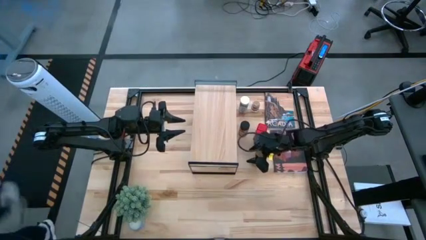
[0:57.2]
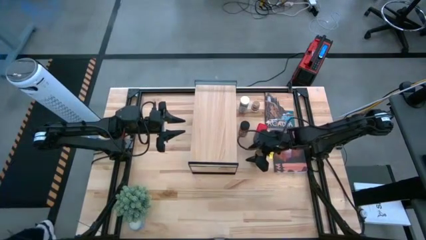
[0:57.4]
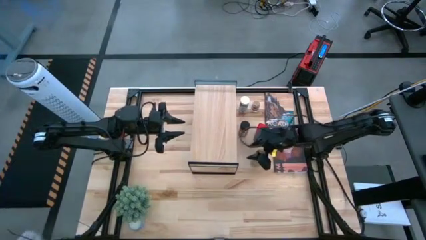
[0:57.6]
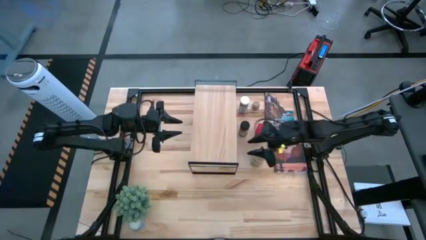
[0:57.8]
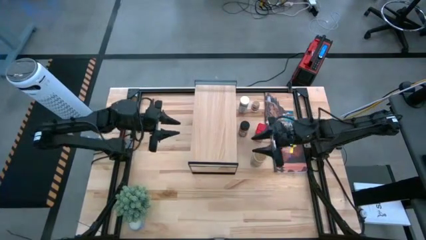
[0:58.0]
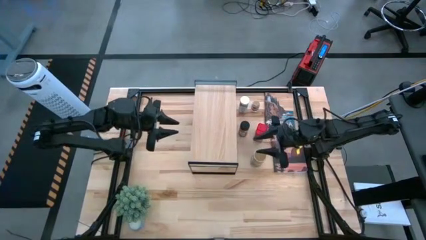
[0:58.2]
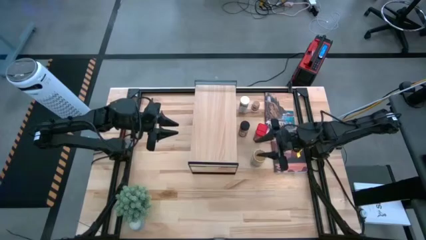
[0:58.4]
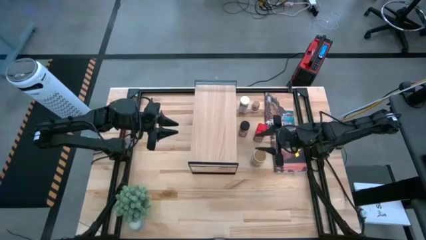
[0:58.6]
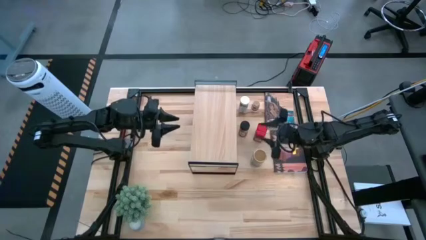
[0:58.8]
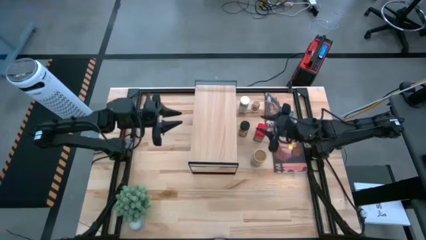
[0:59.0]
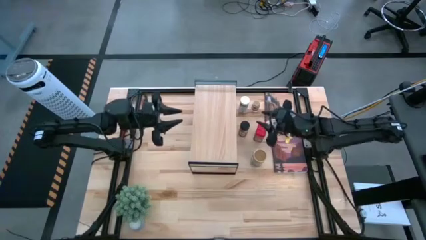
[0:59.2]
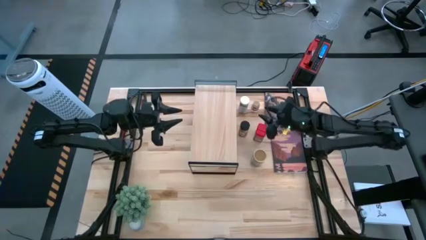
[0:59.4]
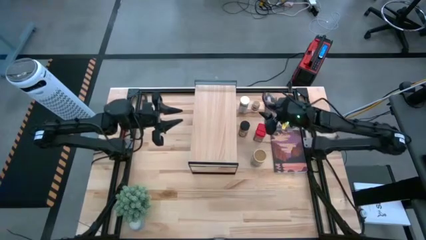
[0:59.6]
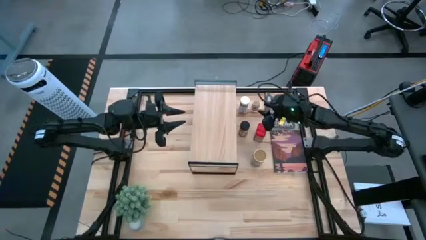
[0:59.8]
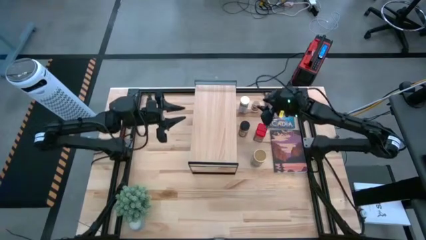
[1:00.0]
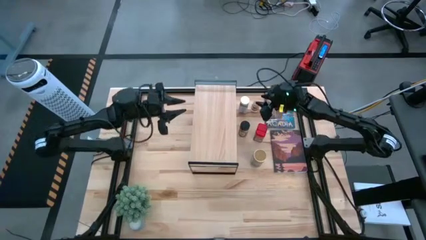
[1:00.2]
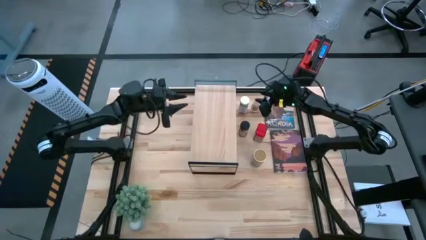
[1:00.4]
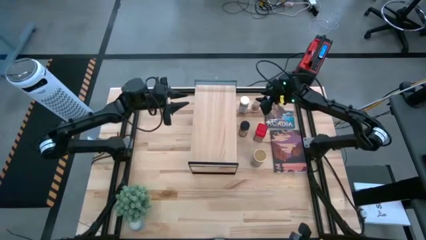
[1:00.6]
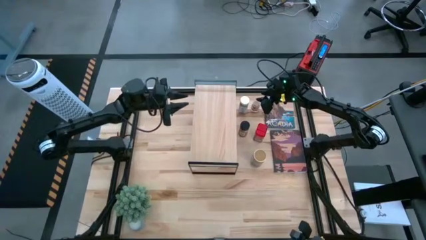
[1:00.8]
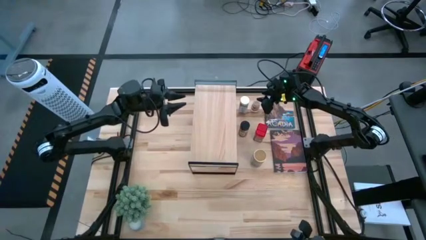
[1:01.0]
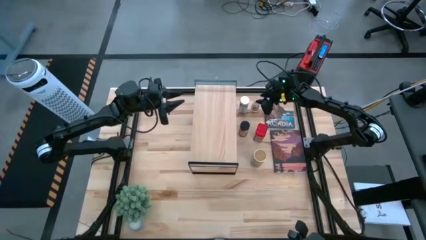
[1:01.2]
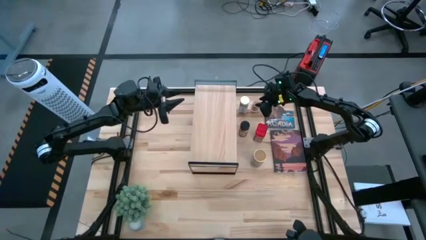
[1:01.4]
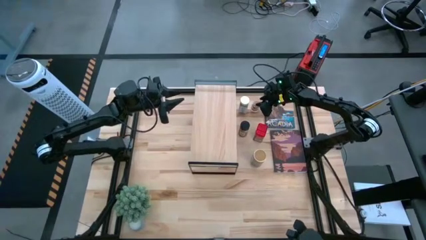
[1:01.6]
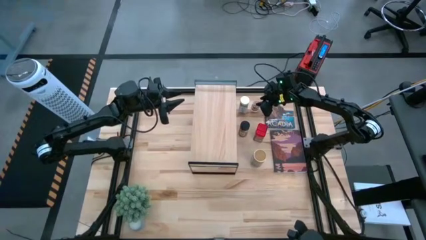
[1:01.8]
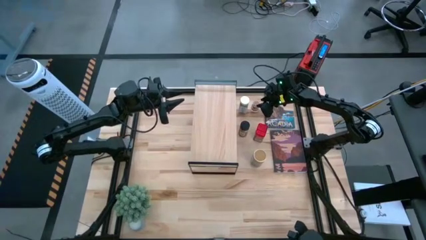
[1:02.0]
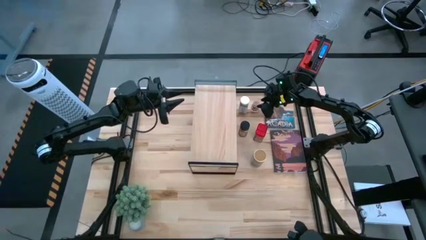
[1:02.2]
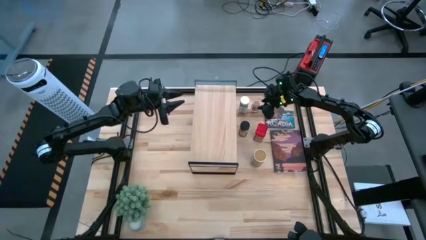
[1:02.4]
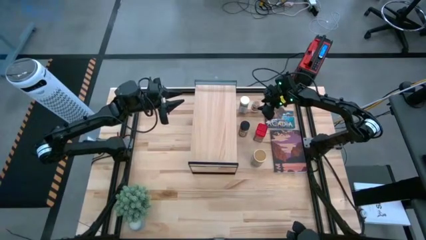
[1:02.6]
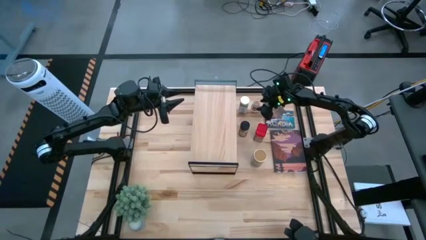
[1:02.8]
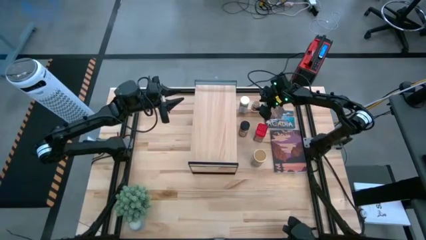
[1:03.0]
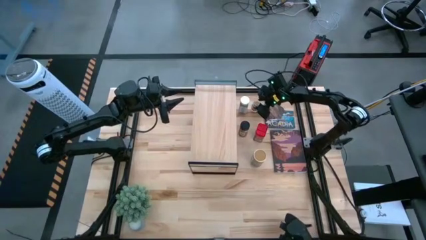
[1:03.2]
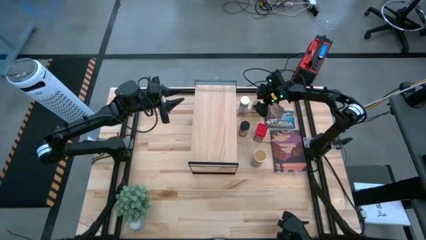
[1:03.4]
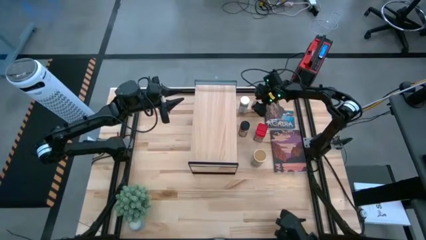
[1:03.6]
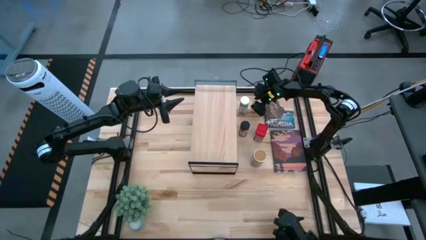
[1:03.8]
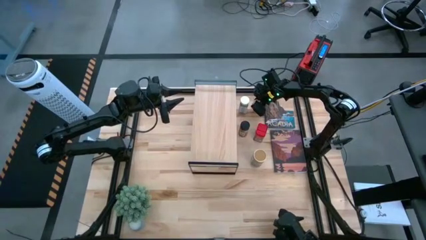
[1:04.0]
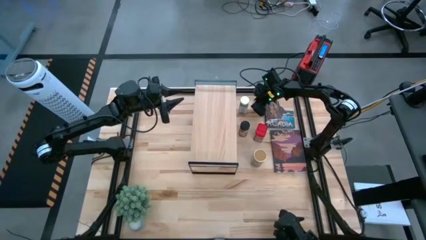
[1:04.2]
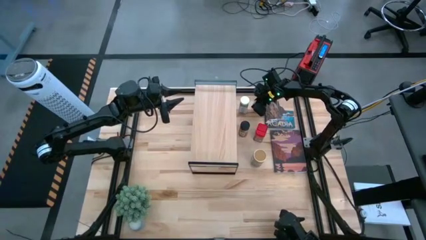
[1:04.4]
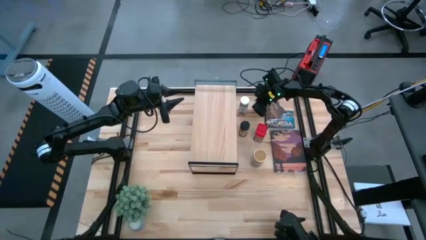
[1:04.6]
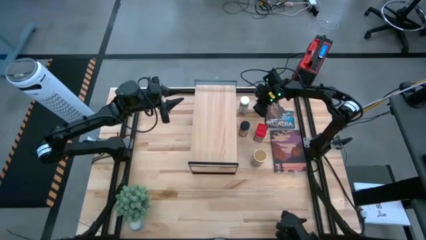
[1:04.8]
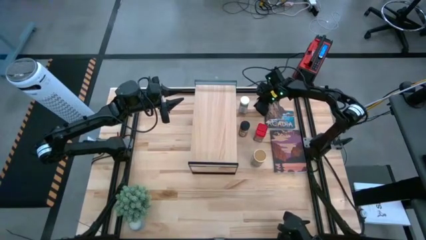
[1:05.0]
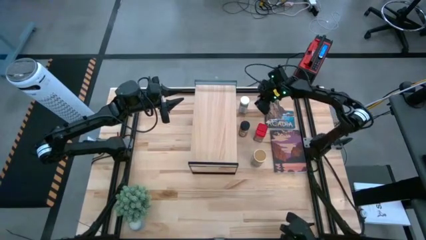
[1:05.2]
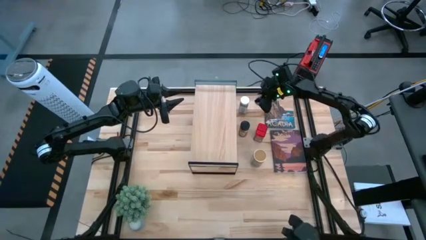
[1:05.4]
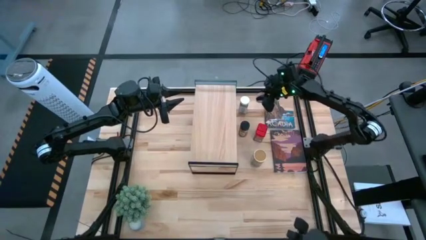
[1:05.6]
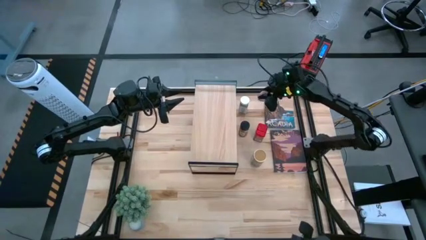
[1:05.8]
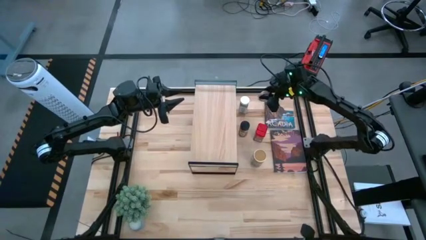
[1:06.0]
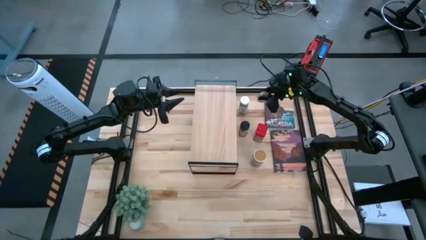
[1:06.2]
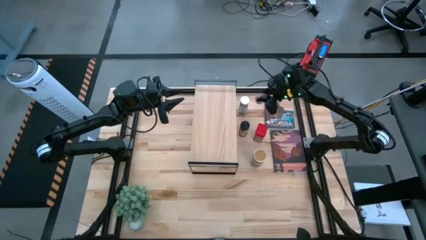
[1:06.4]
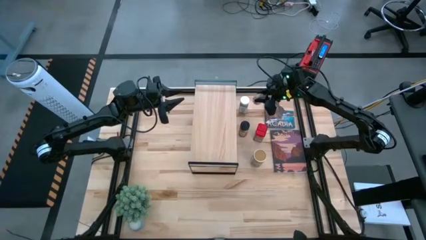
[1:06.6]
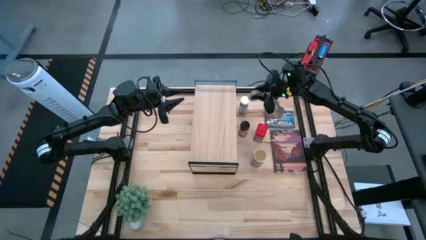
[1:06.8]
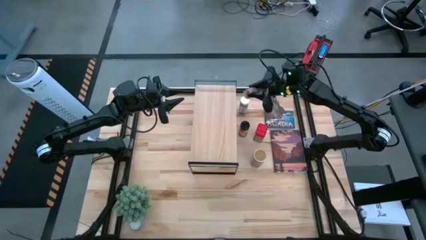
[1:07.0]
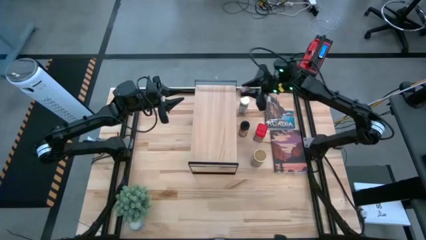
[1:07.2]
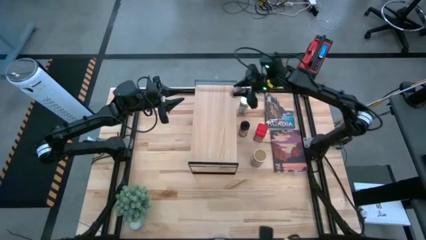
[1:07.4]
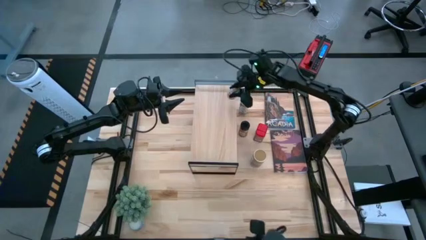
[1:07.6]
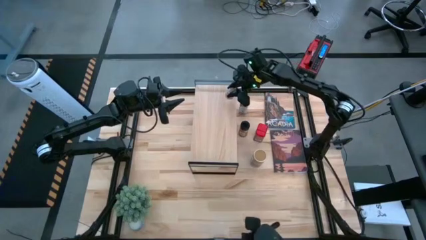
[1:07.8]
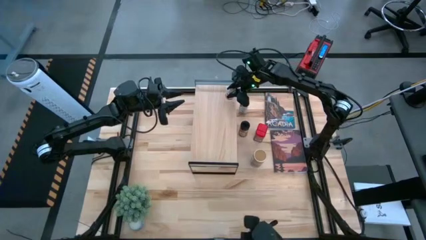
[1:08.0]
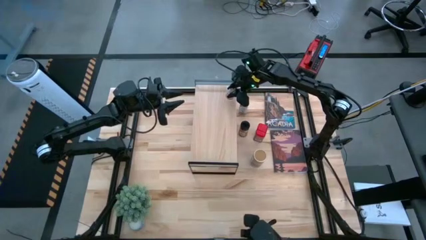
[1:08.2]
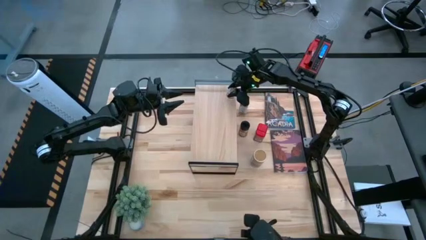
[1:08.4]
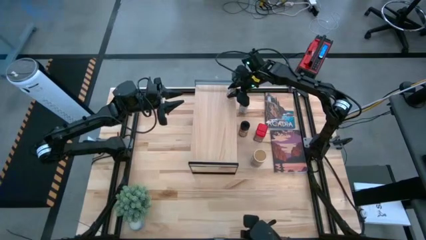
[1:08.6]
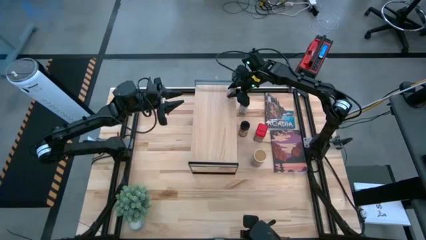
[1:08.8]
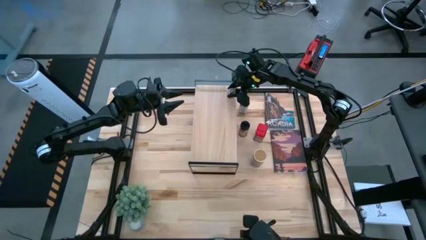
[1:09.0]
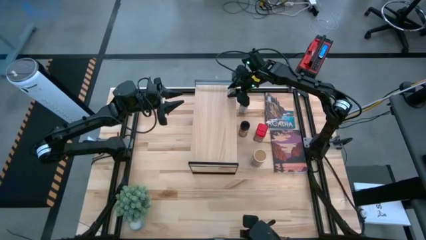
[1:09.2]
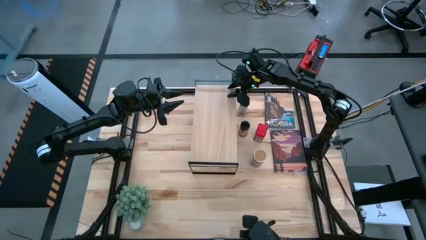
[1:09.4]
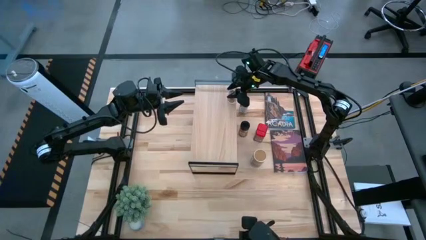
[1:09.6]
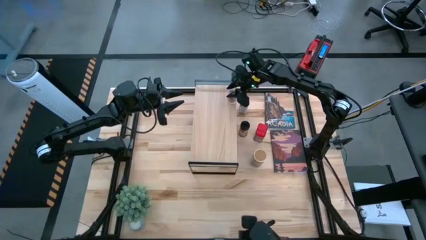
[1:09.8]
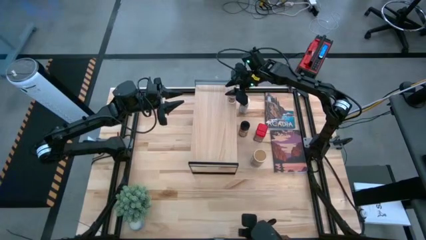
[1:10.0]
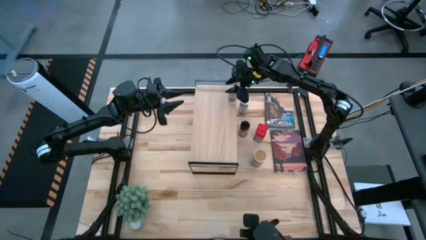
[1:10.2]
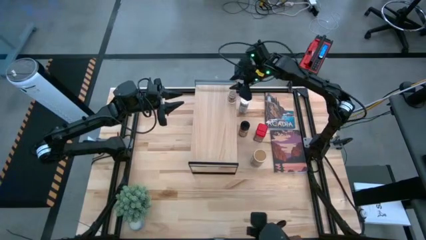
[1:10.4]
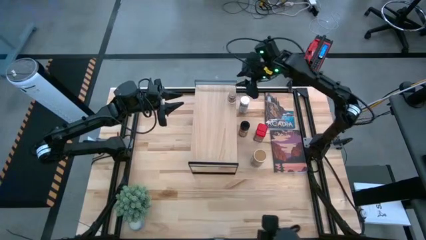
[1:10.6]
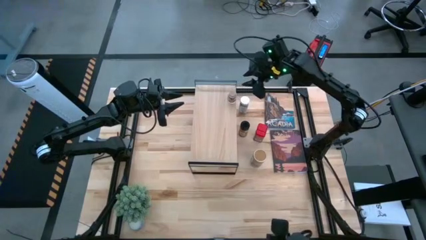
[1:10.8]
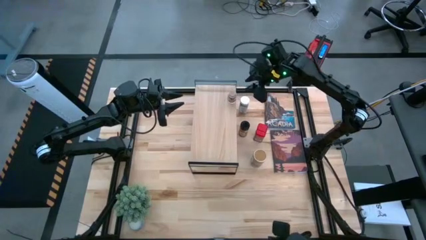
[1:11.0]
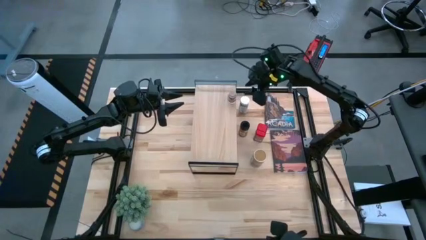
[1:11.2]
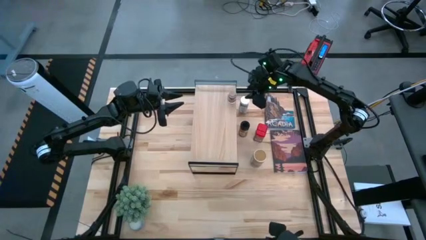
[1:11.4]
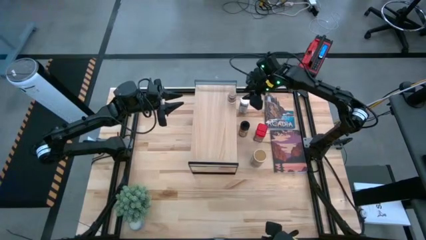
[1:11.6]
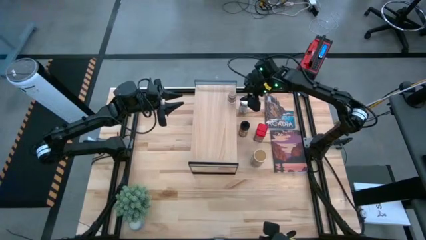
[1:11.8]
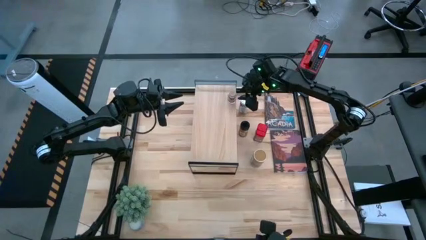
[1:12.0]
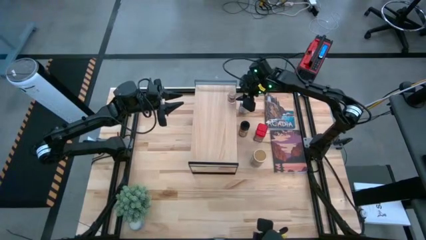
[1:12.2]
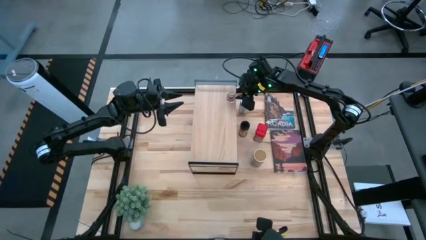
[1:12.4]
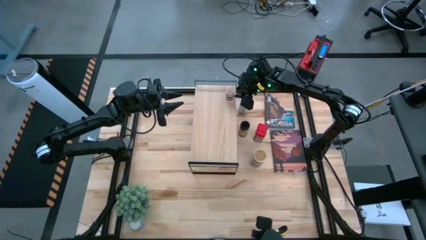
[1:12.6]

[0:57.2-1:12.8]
Task: Shelf spices
Put the transparent seasoning bottle on the shelf

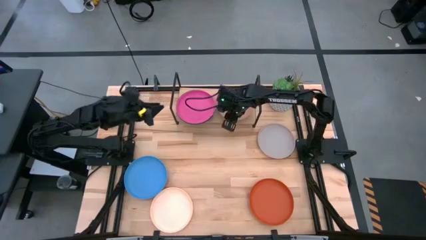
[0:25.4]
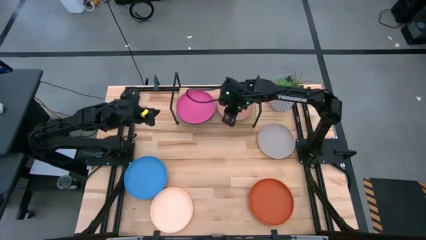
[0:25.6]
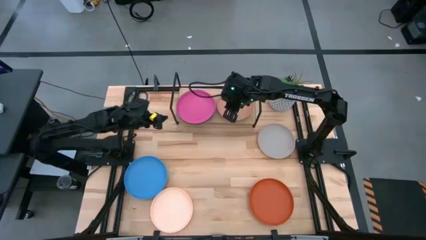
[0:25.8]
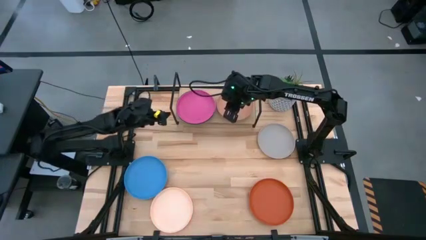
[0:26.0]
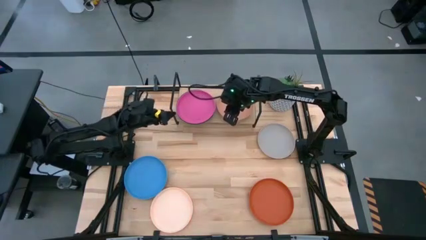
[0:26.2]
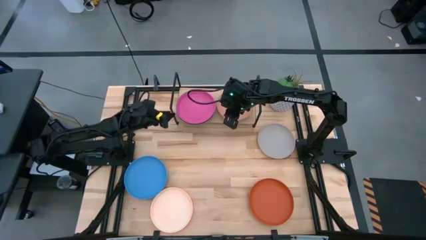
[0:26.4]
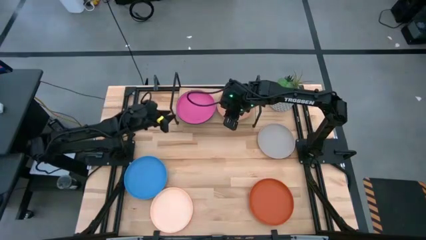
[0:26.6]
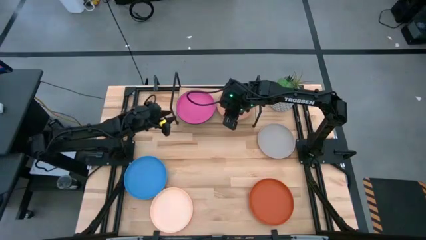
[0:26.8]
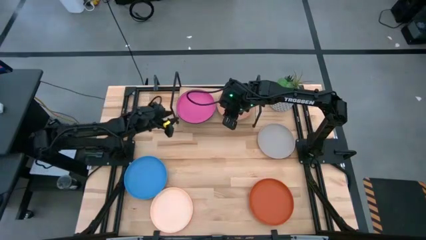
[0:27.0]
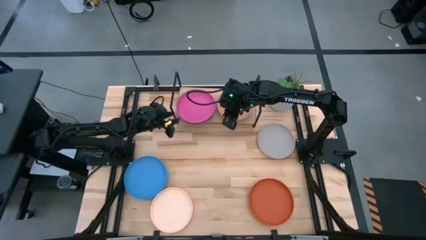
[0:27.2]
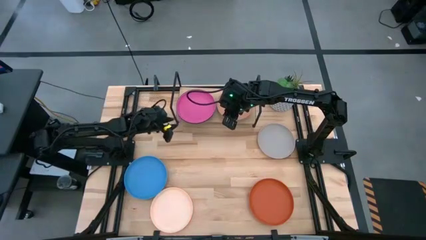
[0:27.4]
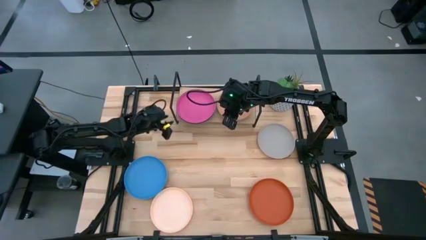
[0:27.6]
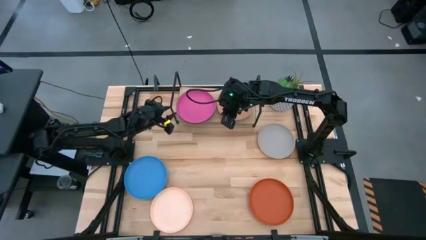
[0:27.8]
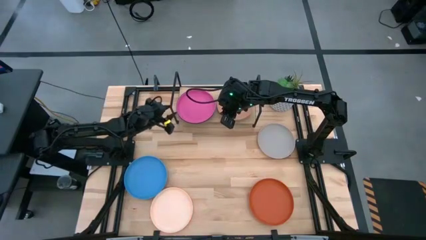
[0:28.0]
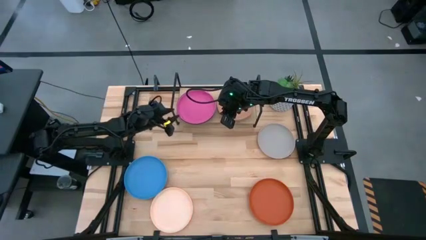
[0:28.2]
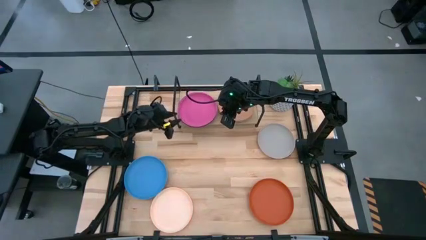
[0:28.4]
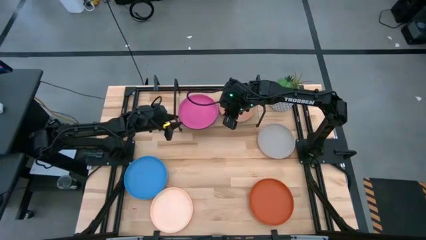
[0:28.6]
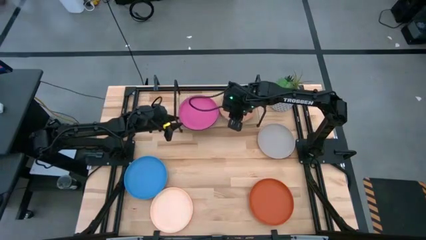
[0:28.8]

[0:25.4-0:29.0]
Task: Place and stack plates onto a shelf
Adjust the shelf
